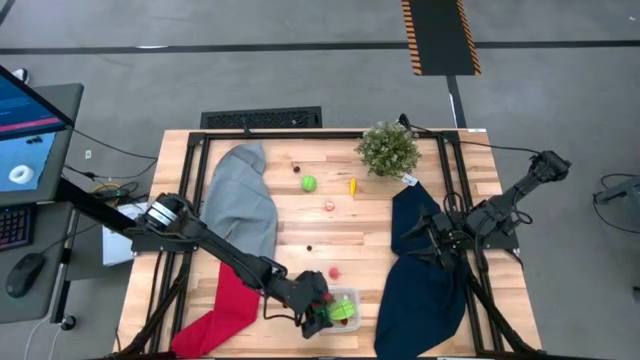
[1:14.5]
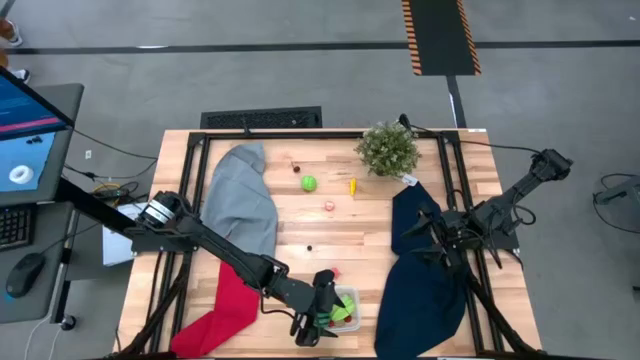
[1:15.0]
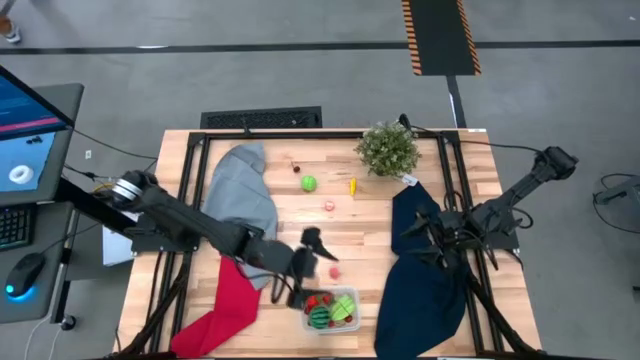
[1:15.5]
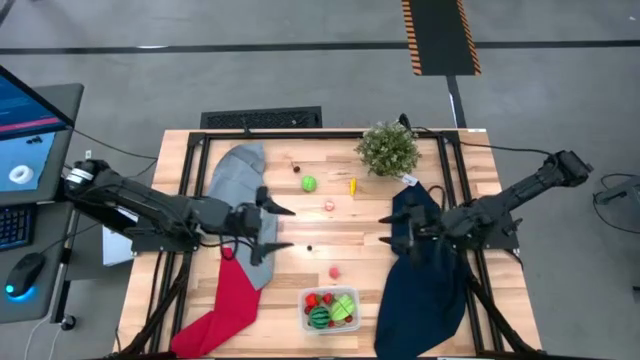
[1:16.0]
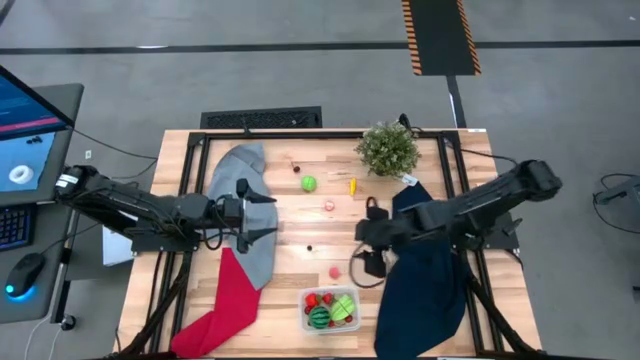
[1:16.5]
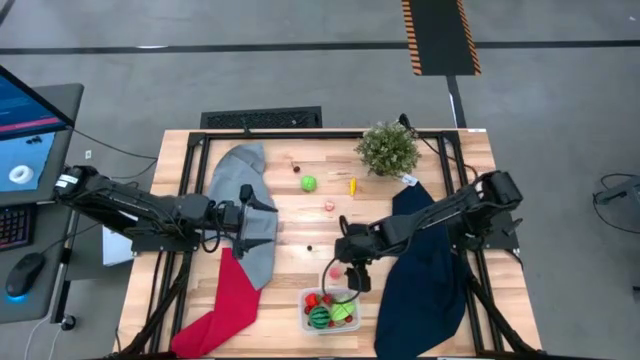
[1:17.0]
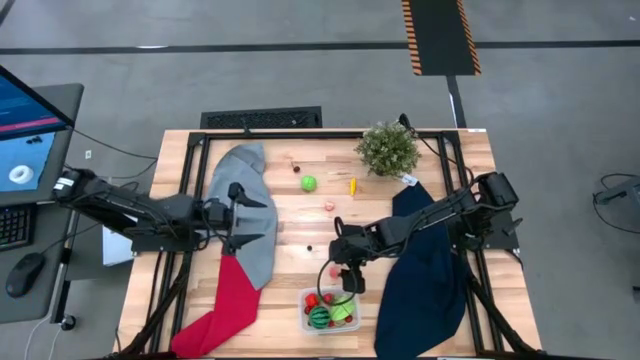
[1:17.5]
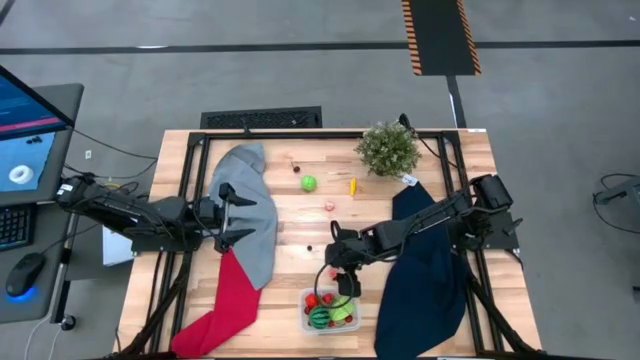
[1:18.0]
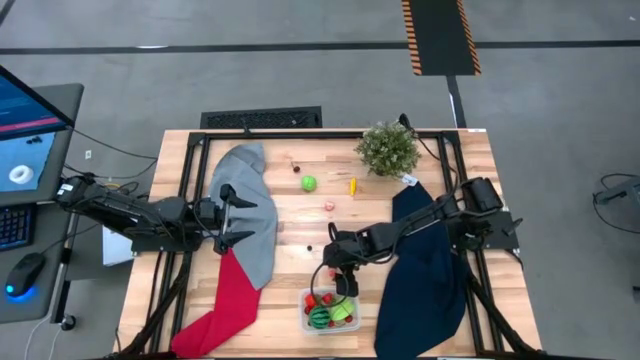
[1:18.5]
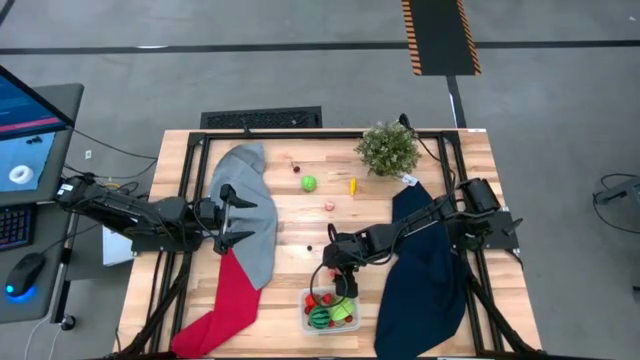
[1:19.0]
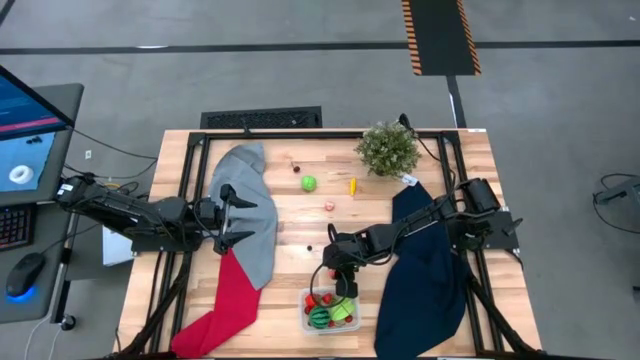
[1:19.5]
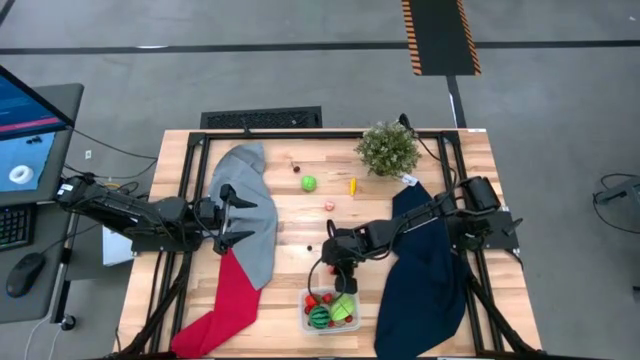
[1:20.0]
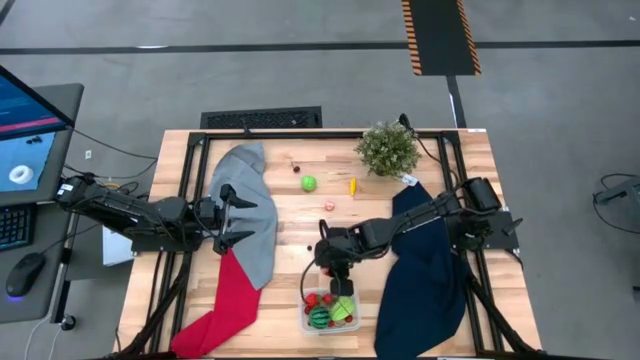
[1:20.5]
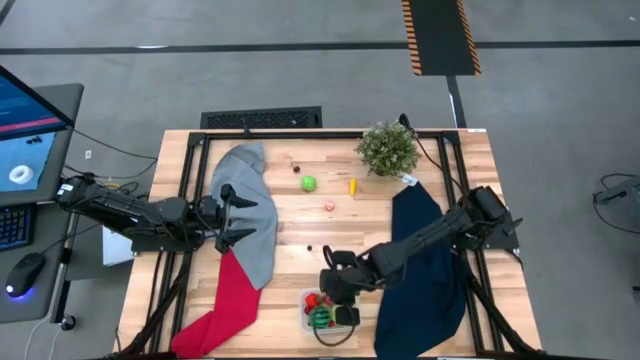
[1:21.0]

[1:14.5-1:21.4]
Task: Pick and placing Produce into tupperware
Put the peach into the transparent bin

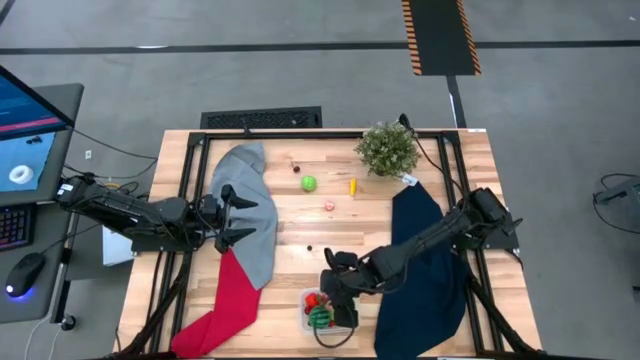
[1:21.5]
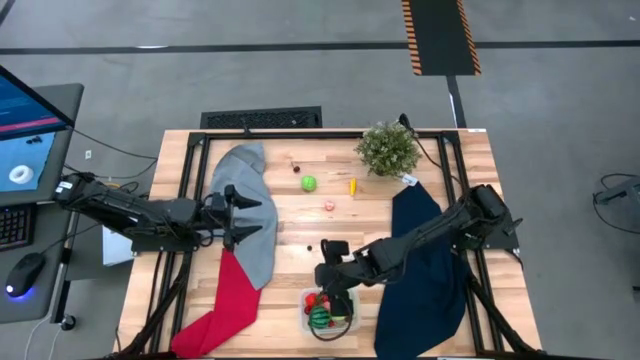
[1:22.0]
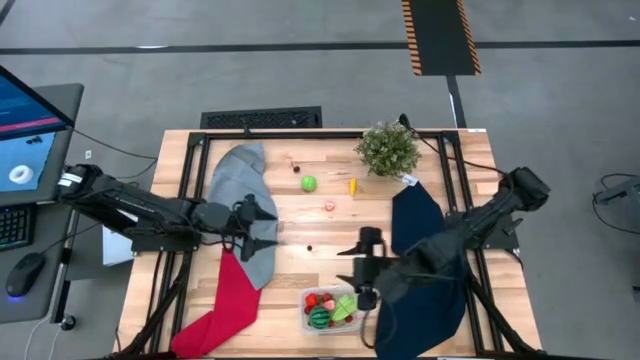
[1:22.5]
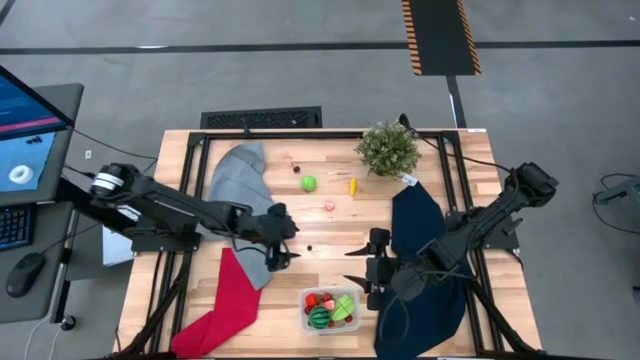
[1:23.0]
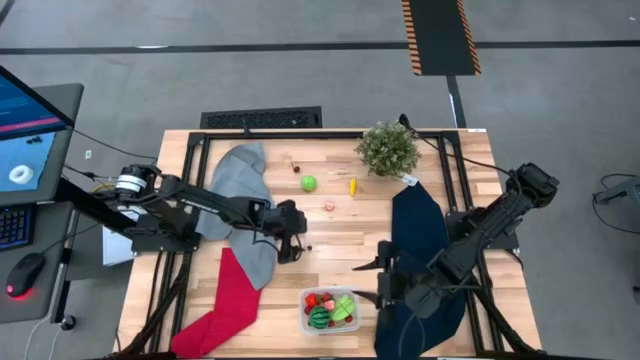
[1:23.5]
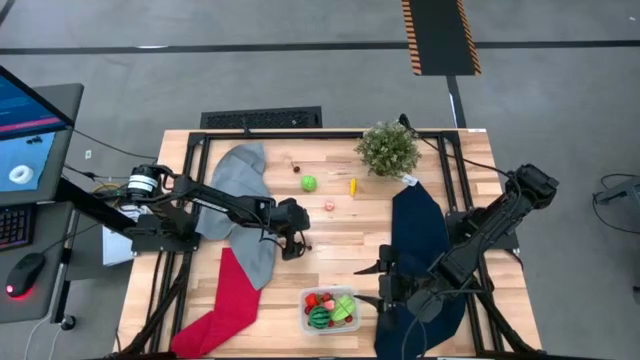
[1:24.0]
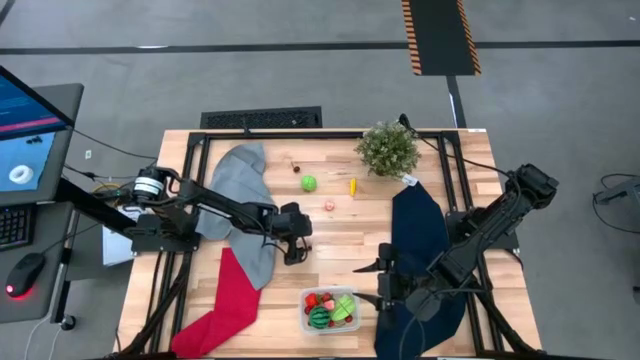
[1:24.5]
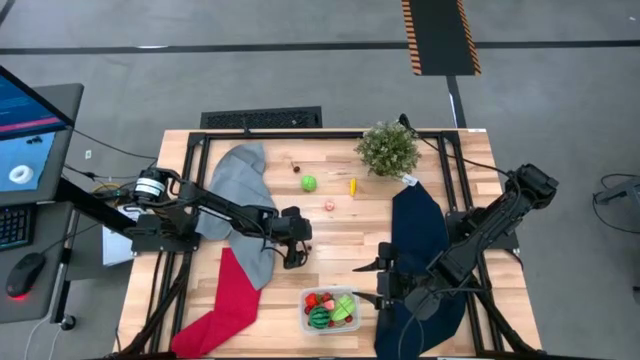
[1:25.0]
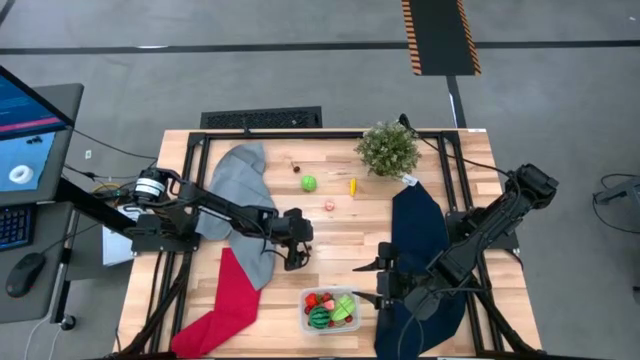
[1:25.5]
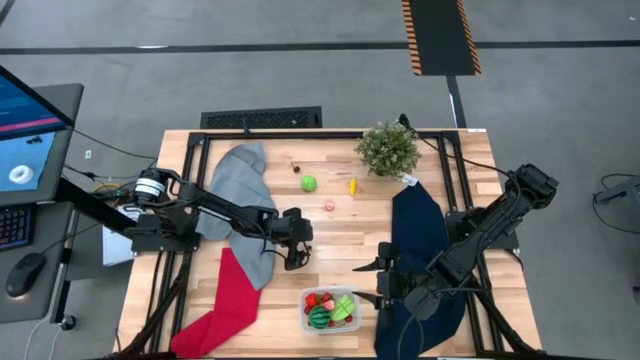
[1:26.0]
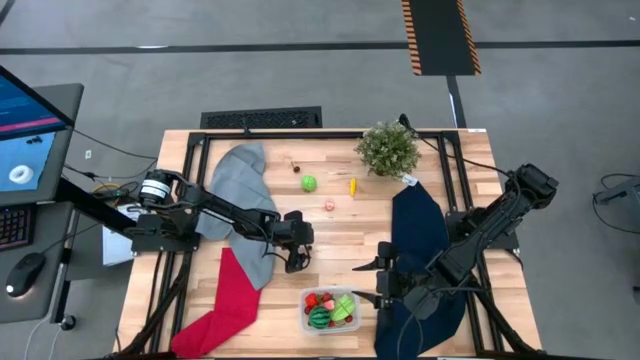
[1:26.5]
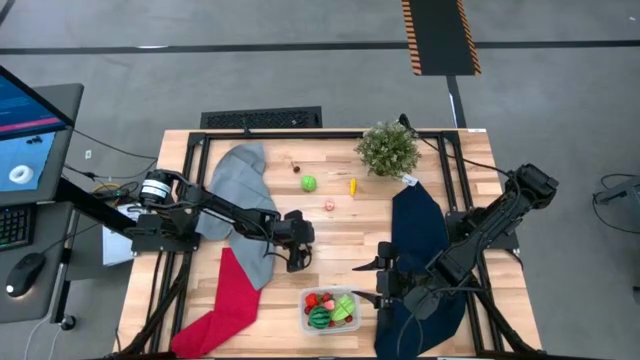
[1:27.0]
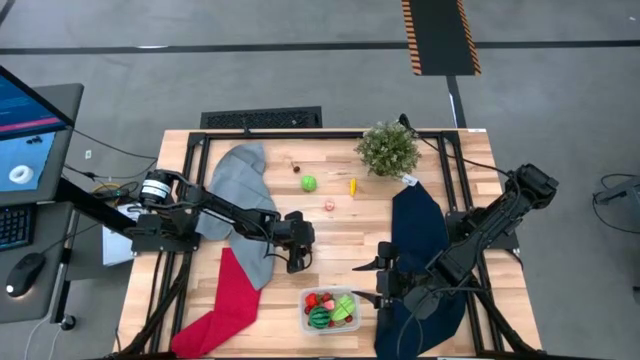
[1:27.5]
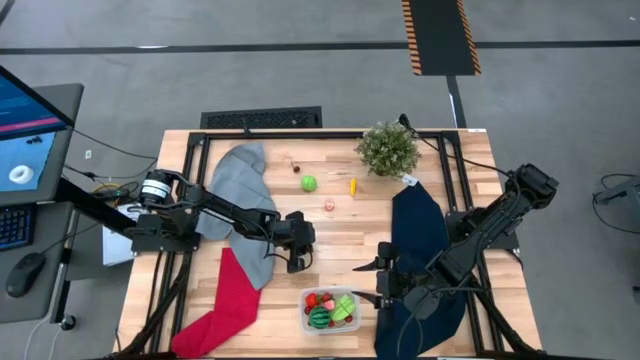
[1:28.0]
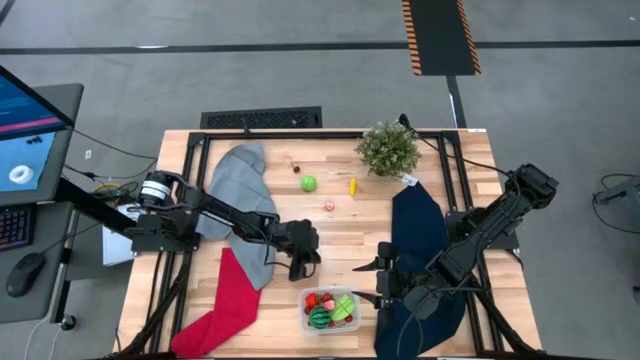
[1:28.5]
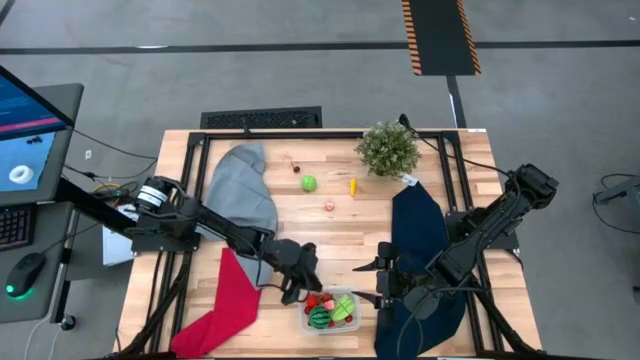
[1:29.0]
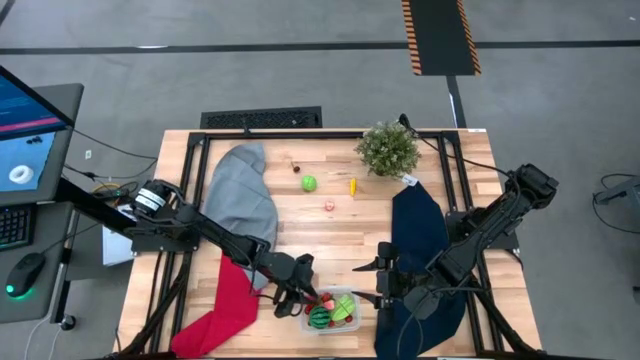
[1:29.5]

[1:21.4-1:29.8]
Put the blueberry into the transparent bin

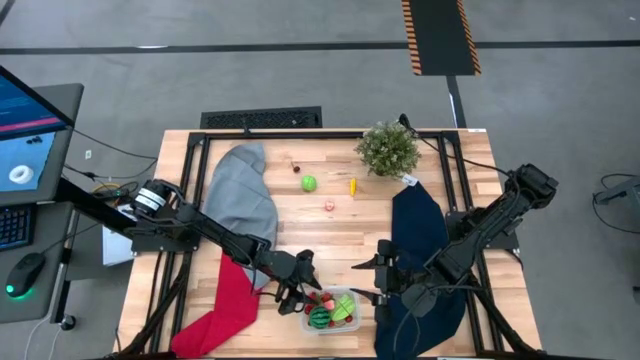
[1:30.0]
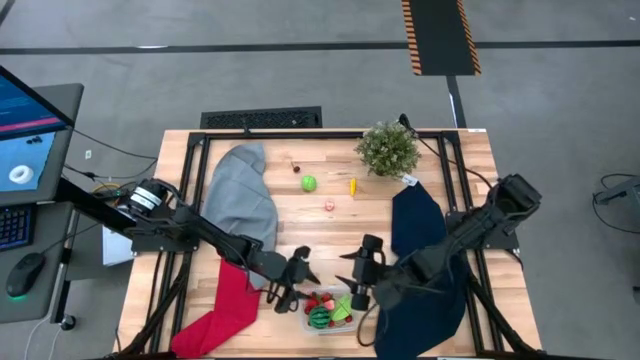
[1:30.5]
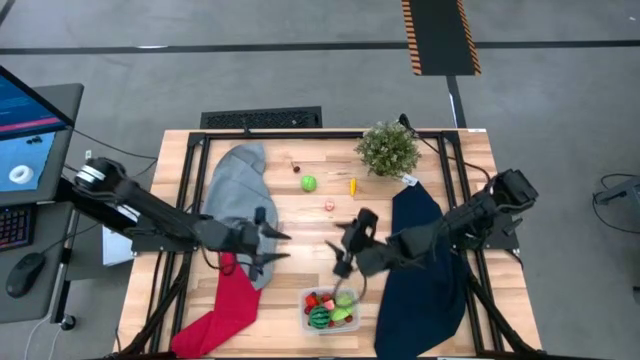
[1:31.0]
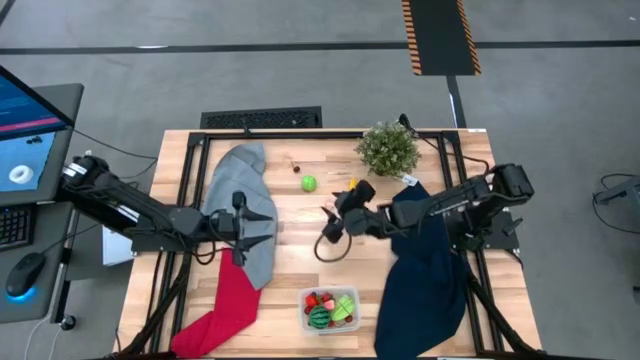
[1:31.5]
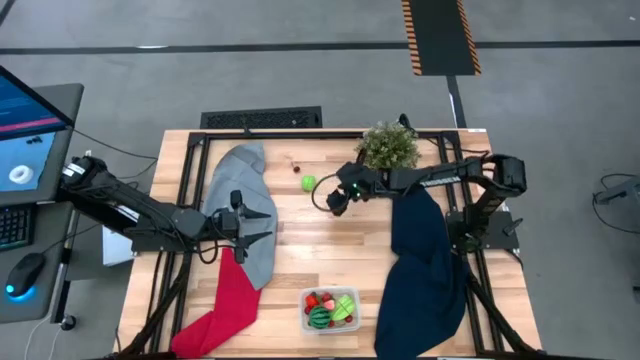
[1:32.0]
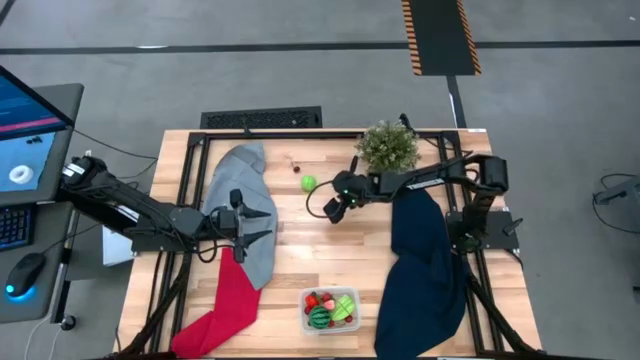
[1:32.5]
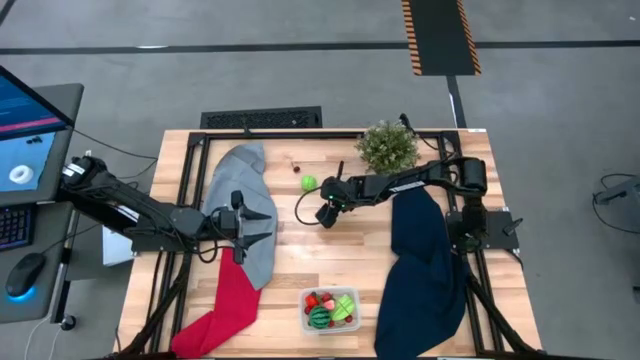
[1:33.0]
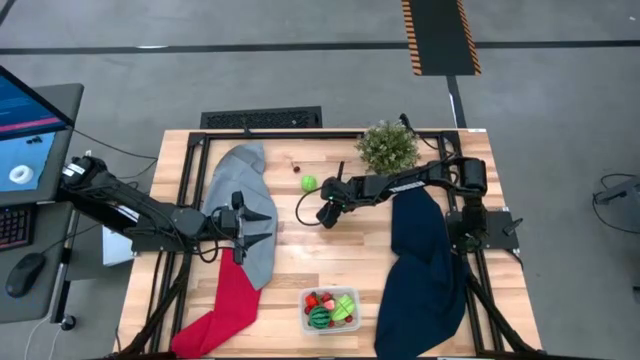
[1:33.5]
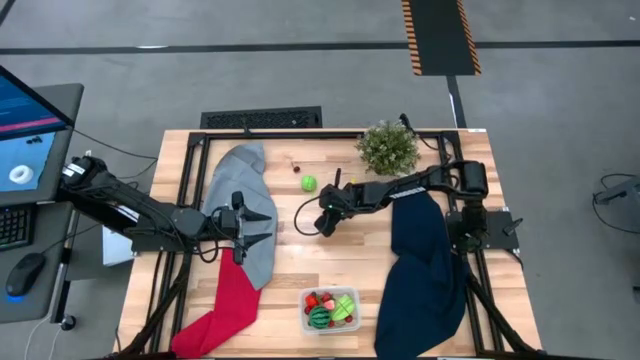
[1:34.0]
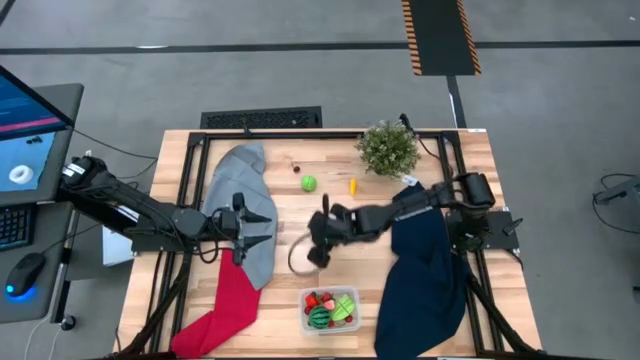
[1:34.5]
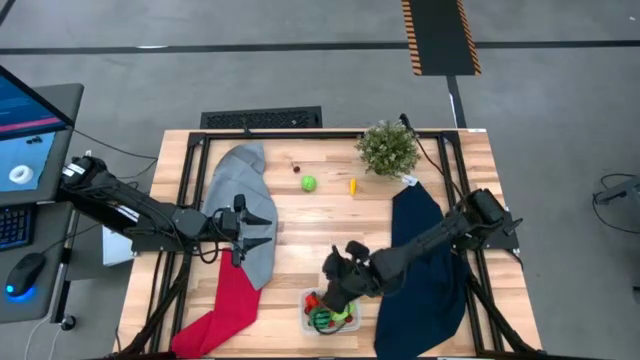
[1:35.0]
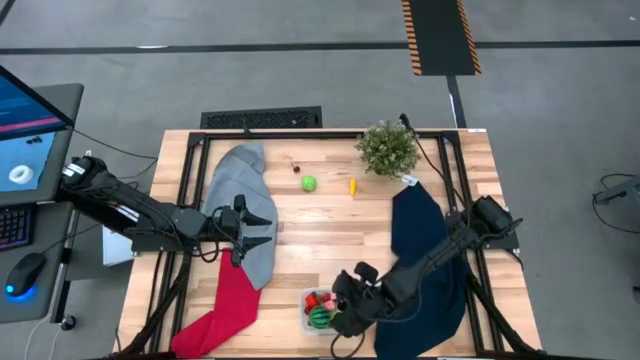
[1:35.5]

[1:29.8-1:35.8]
Put the peach into the transparent bin

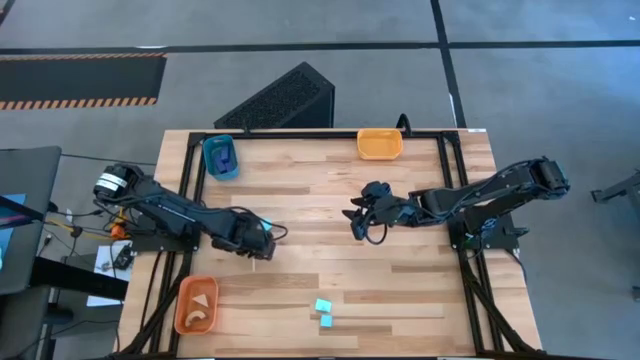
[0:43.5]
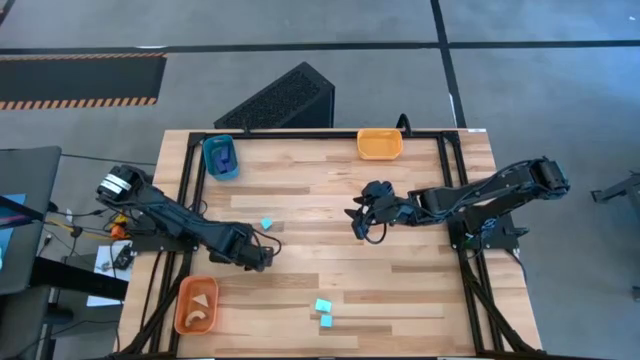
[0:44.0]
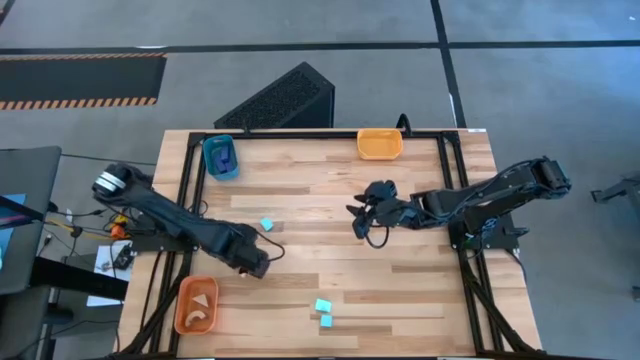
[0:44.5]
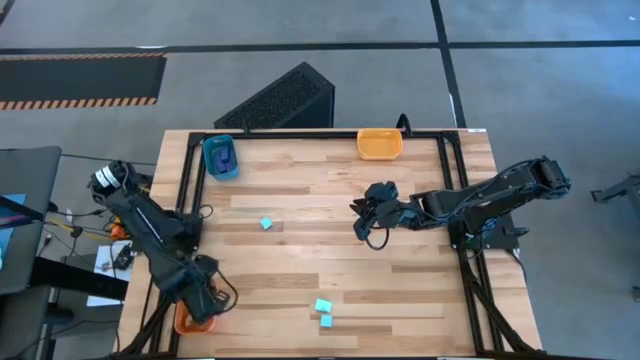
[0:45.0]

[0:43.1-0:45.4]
Task: Sort & place blocks by color
Put the brown block into the orange bin
